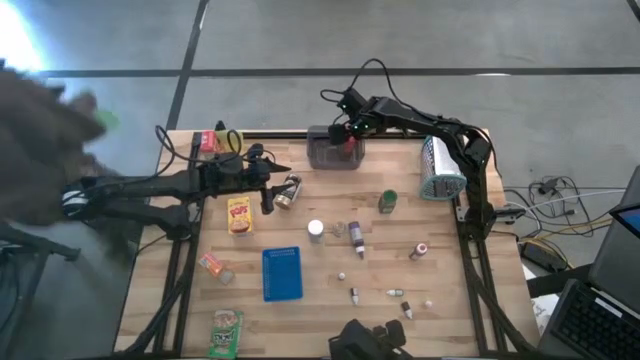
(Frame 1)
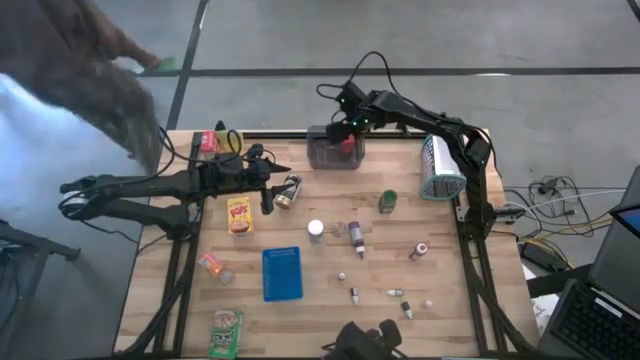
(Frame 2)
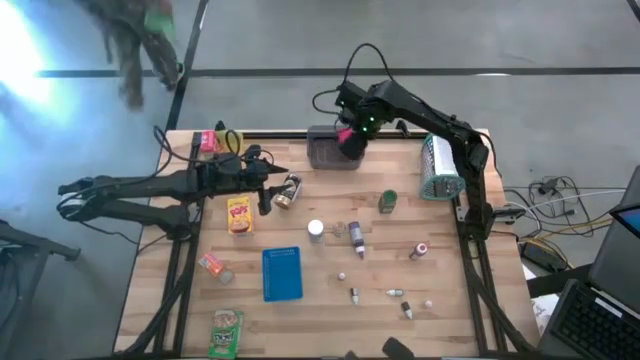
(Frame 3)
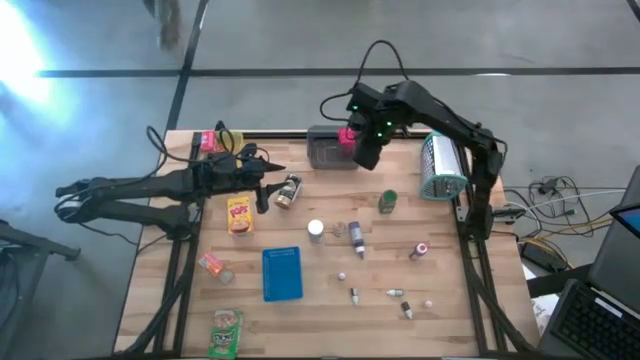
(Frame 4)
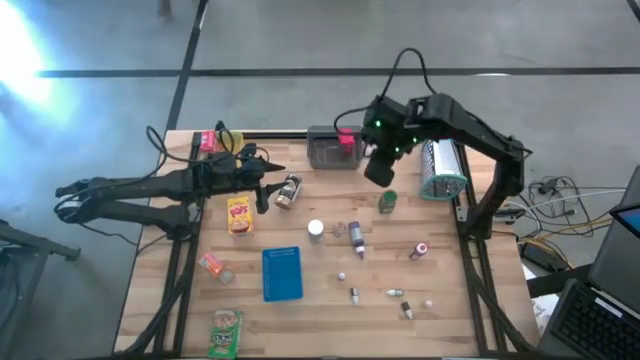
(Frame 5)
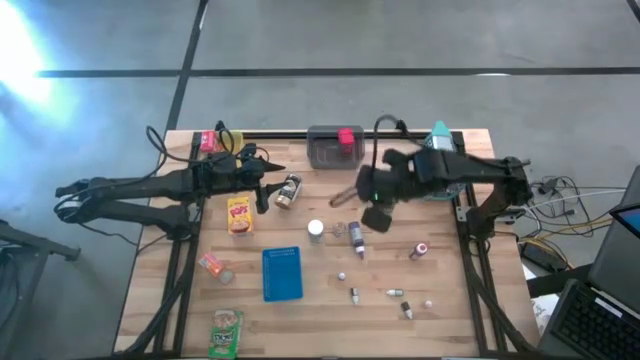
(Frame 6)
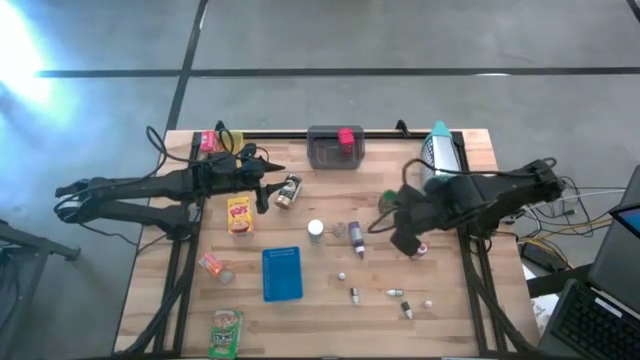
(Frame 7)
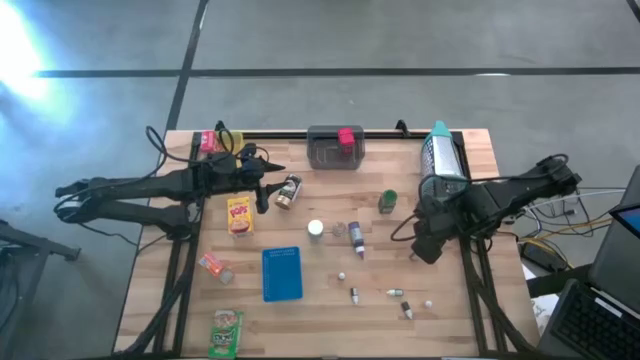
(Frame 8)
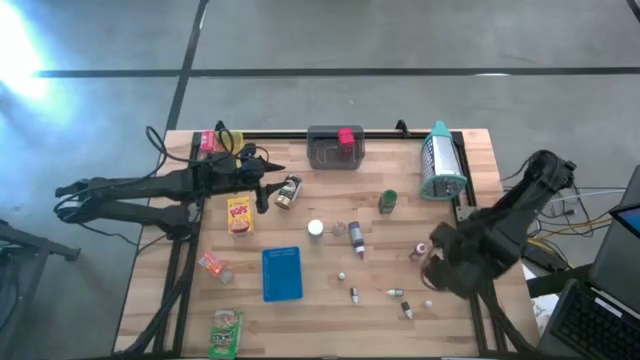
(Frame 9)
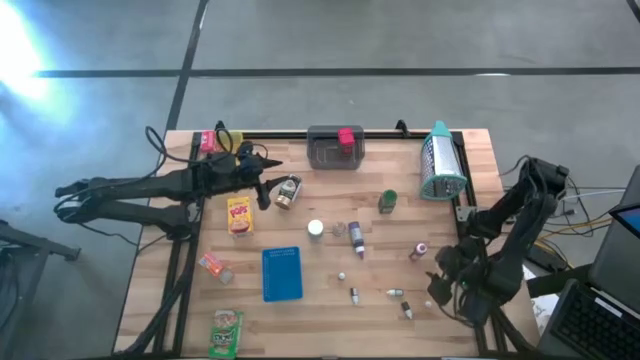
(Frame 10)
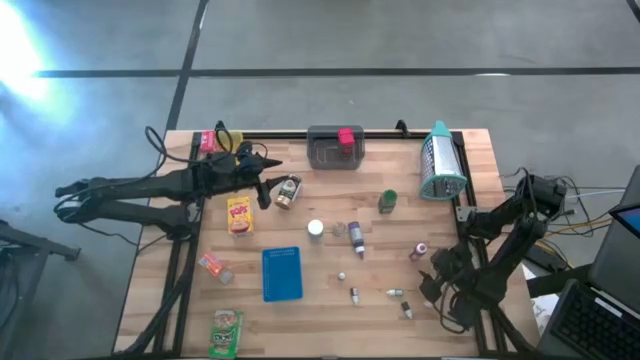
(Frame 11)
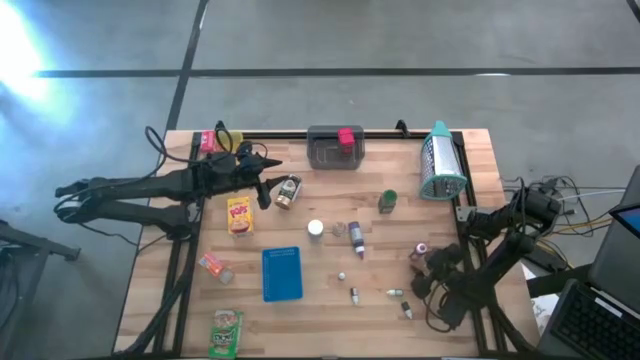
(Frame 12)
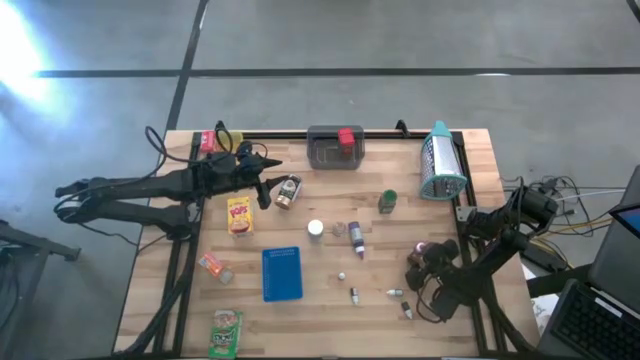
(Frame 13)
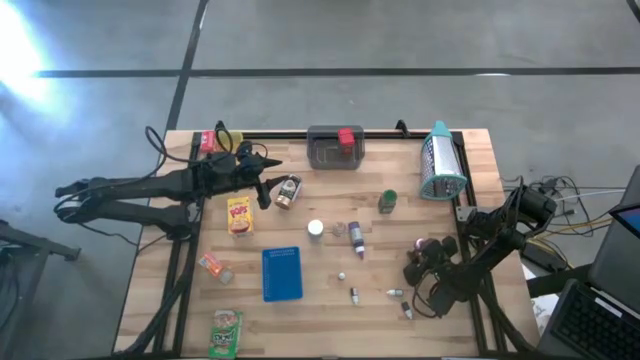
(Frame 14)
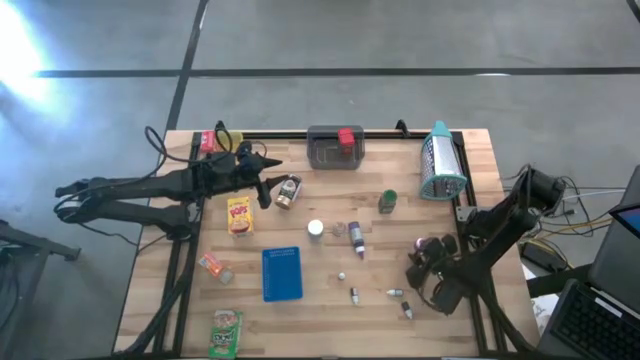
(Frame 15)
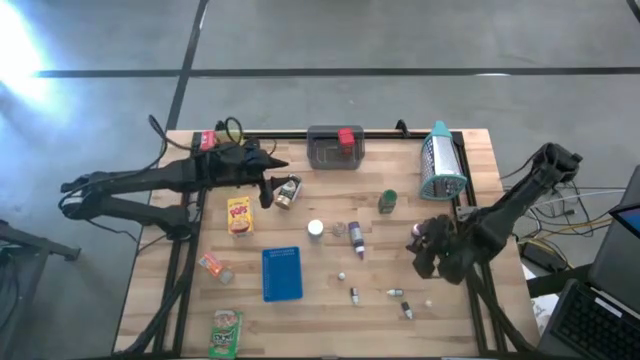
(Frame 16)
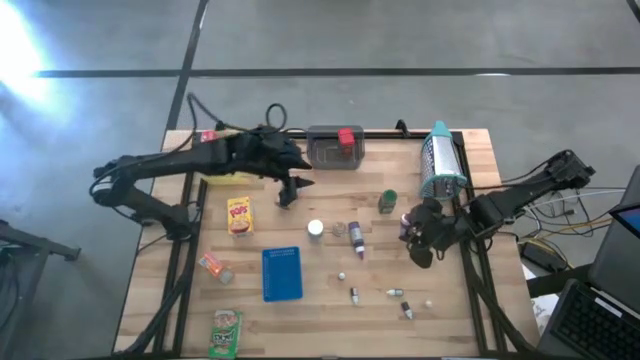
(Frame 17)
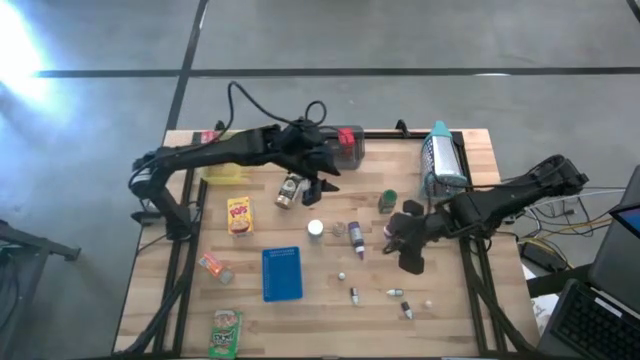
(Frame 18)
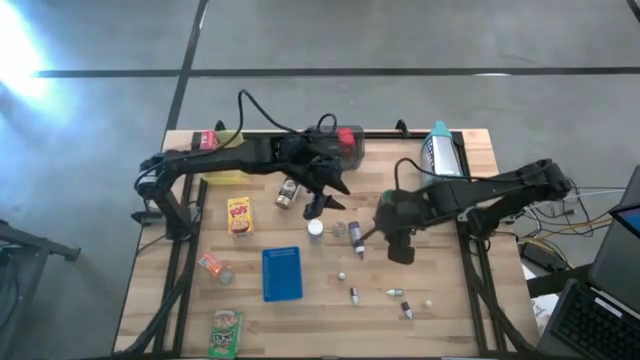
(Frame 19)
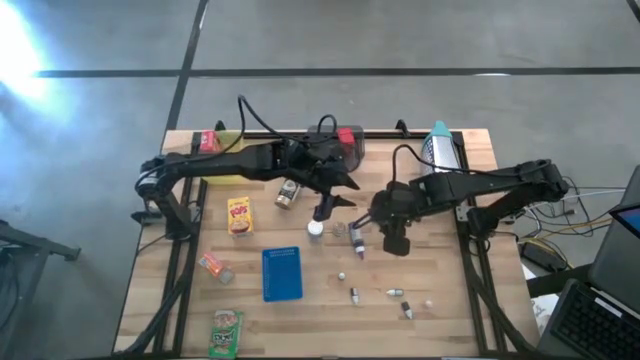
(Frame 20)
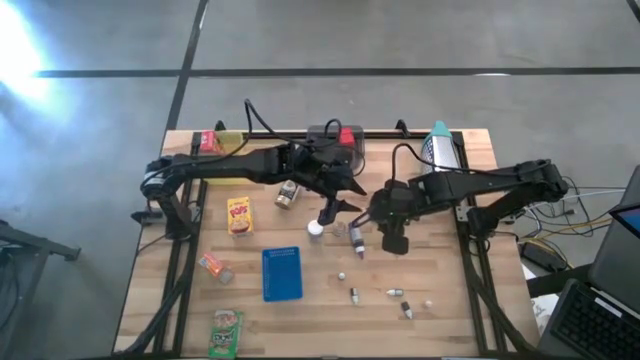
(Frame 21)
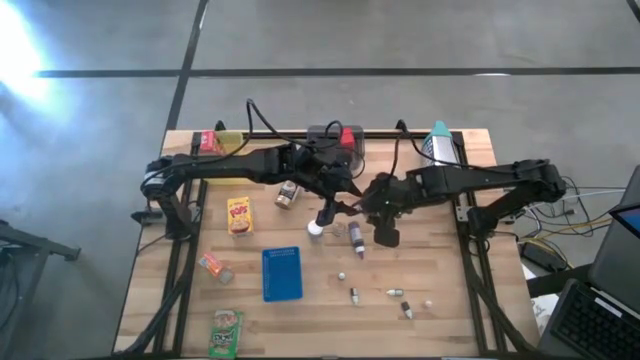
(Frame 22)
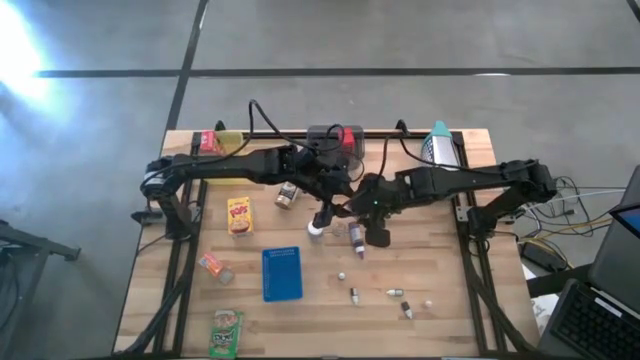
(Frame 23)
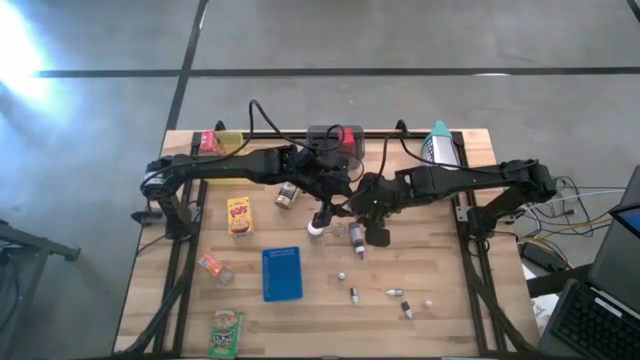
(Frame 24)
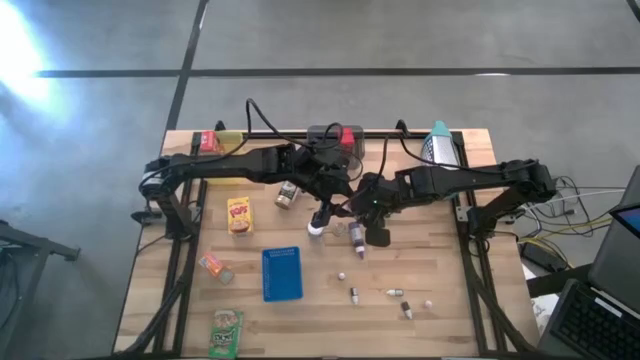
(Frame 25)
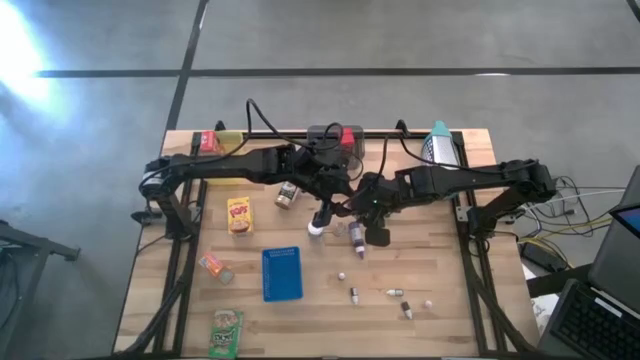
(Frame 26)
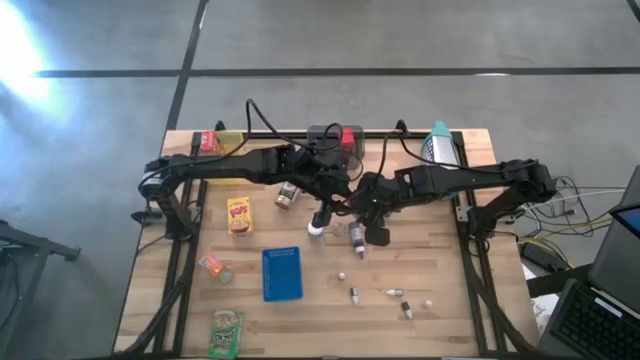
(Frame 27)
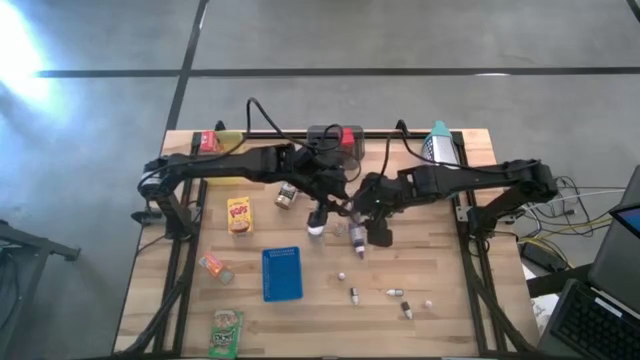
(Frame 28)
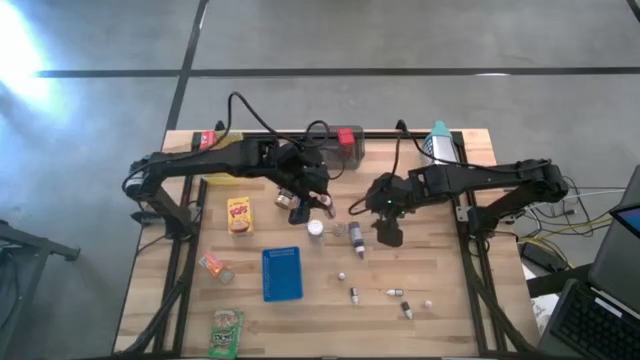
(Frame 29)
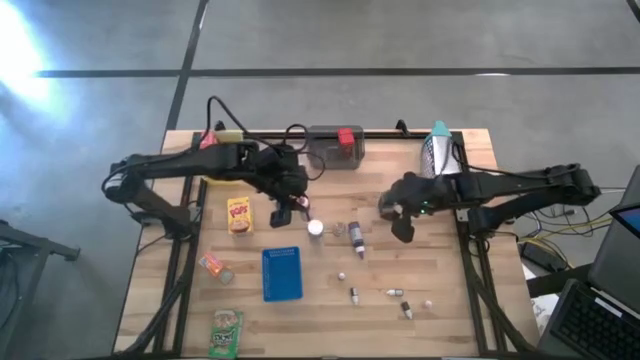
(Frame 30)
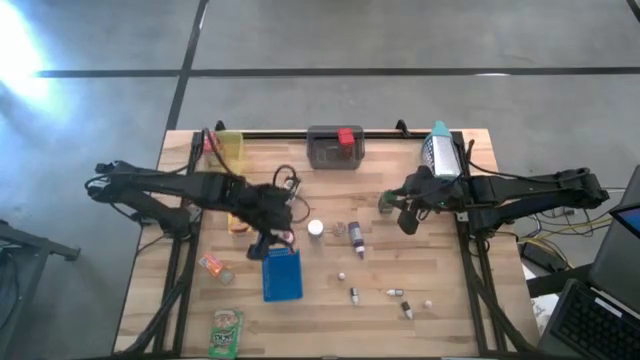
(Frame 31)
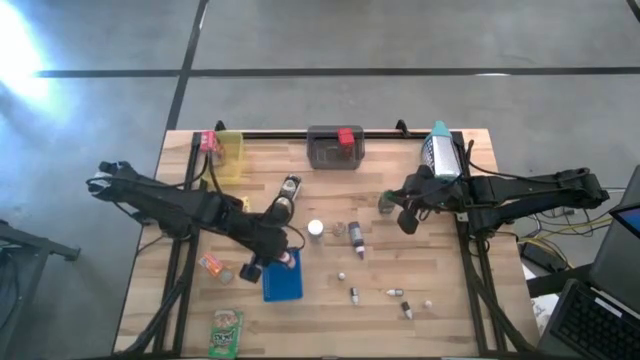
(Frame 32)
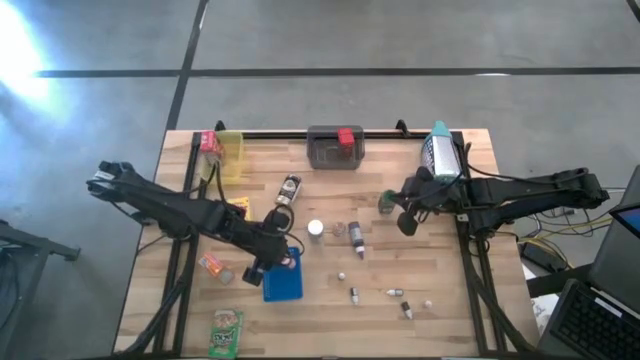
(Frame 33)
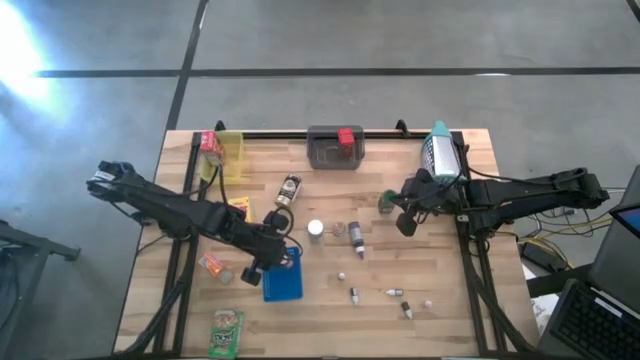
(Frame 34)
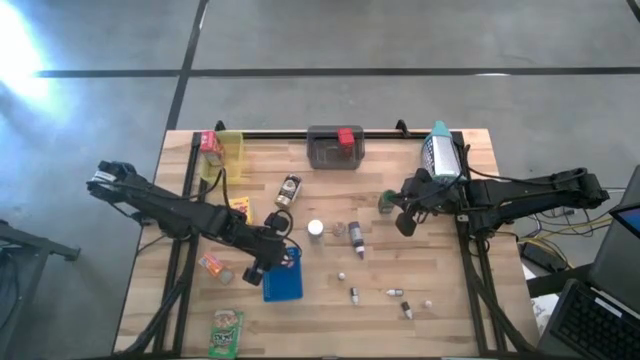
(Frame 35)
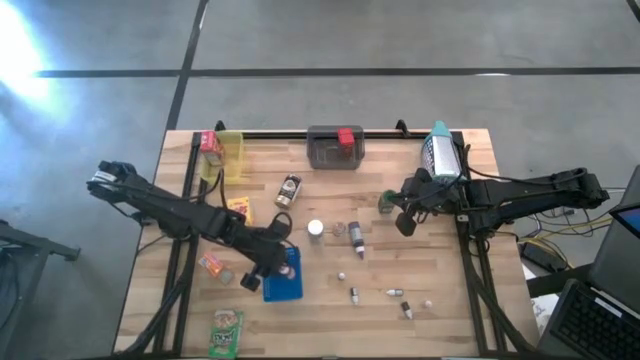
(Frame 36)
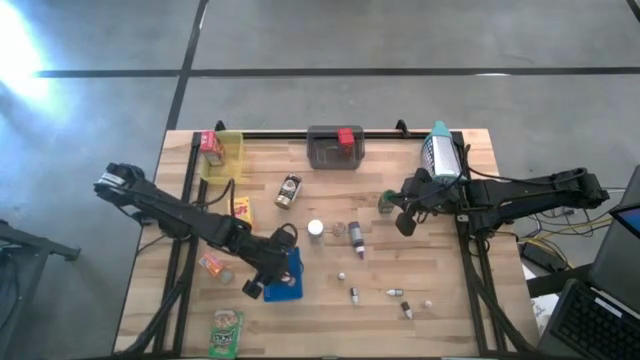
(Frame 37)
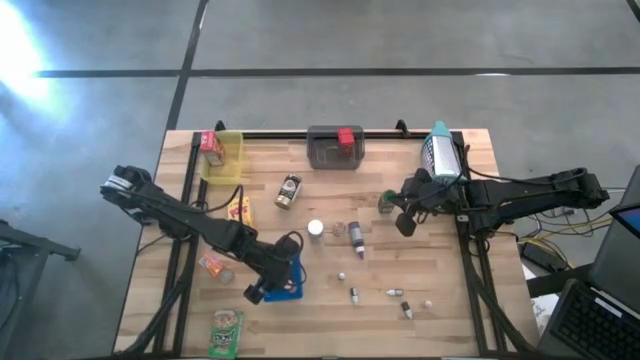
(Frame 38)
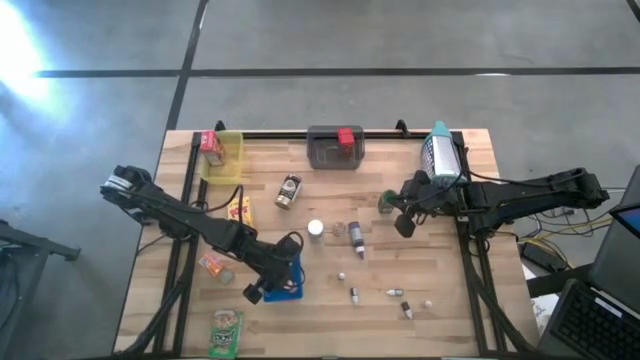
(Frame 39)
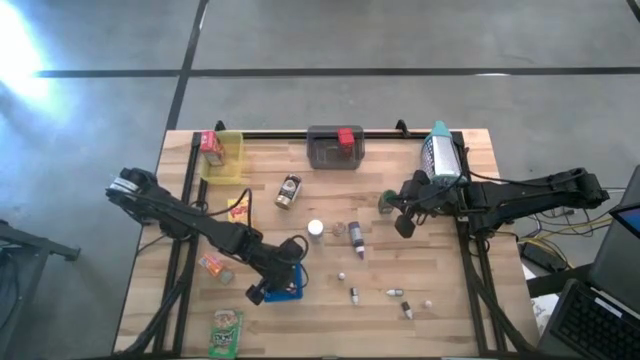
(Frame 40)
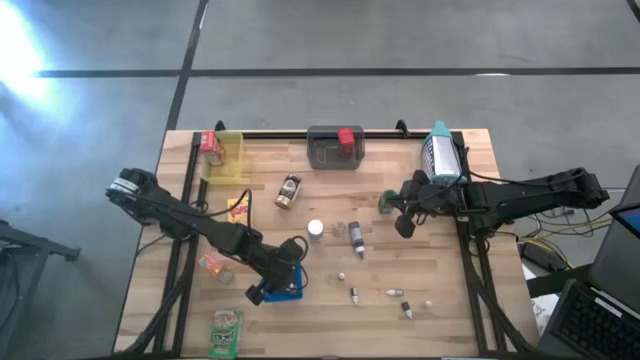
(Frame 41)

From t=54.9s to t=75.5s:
Task: Pick & Place Kitchen Items
Put the large red food coloring bottle into the blue bin

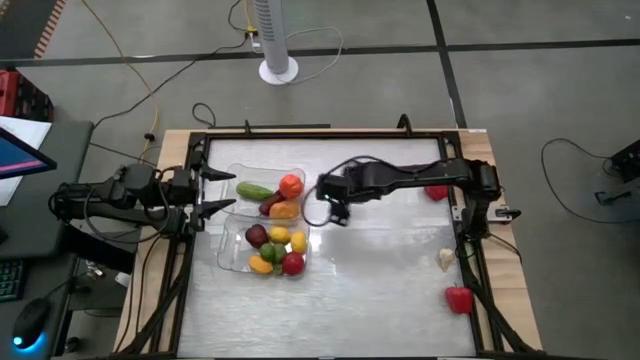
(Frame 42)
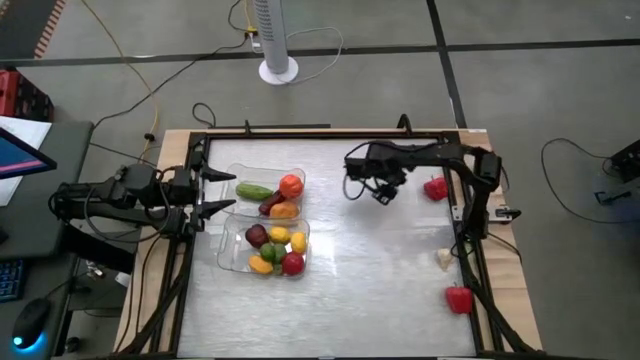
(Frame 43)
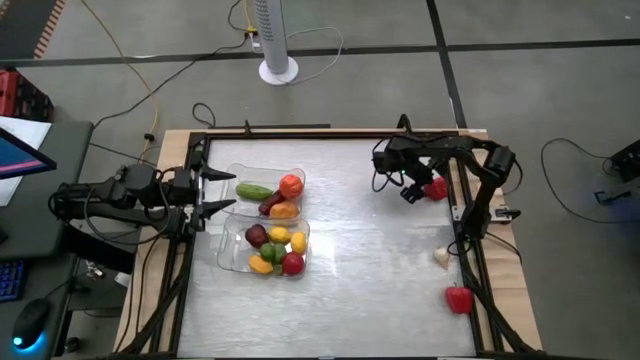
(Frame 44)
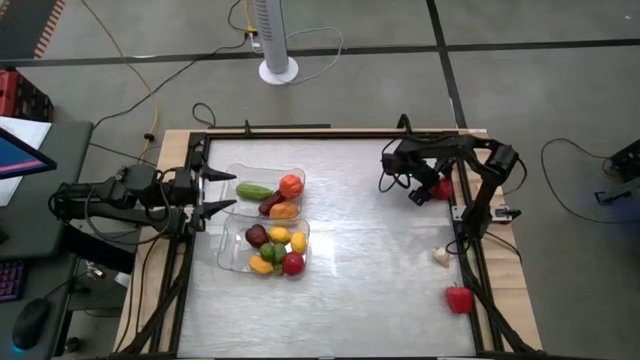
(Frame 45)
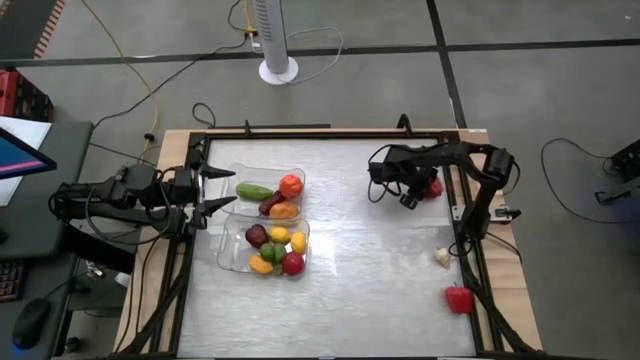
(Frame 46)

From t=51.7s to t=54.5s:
Task: Sort produce into baskets
Put the top red bell pepper into the top transparent bin
